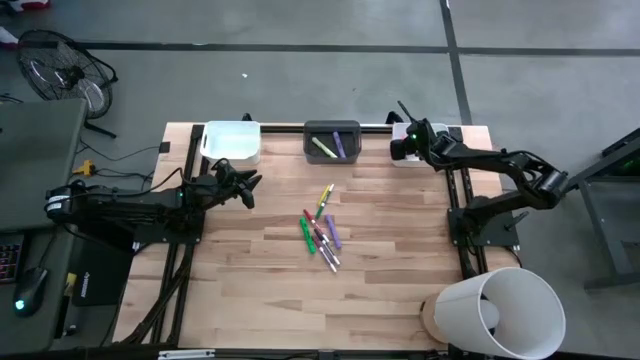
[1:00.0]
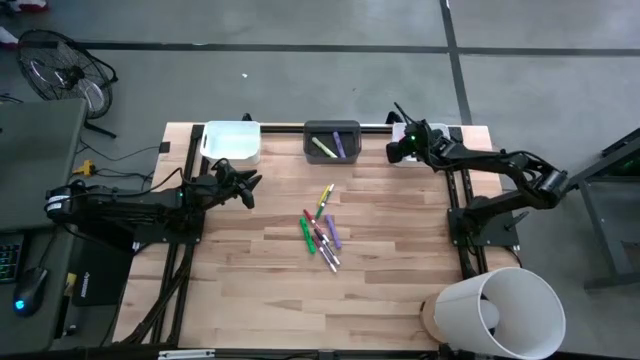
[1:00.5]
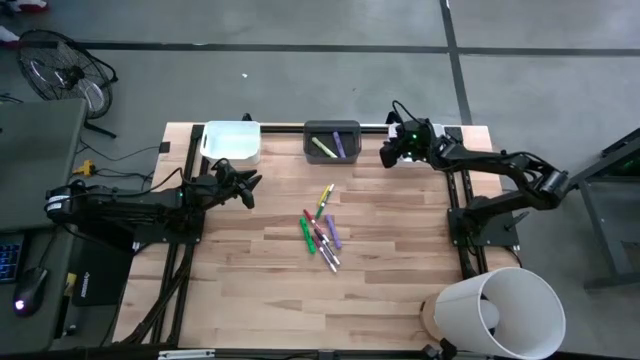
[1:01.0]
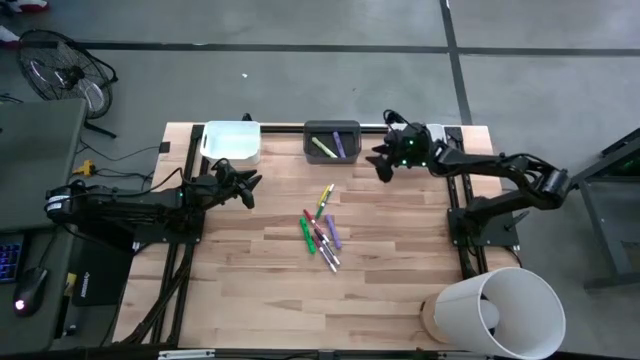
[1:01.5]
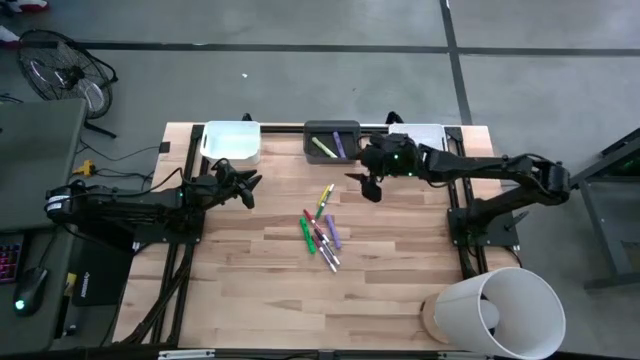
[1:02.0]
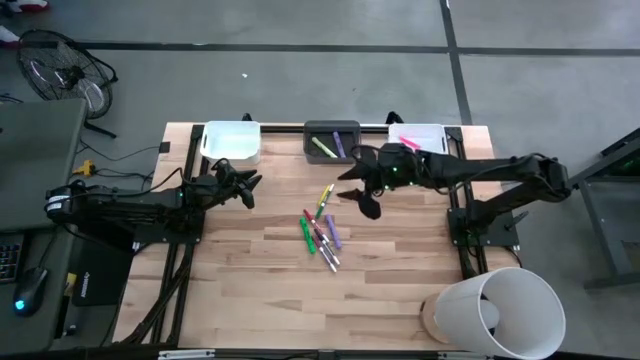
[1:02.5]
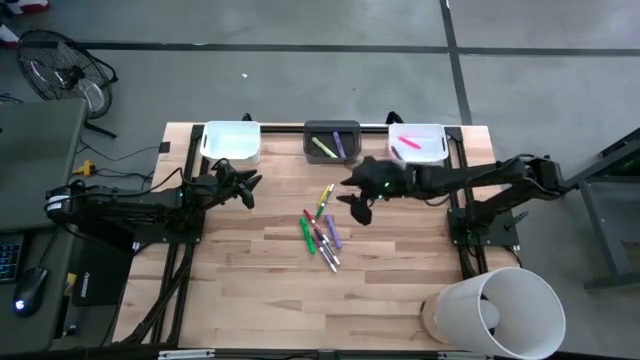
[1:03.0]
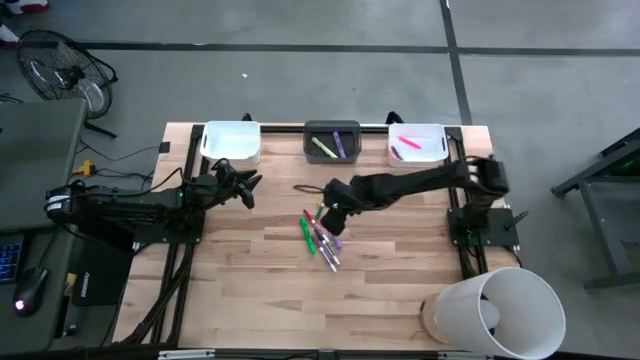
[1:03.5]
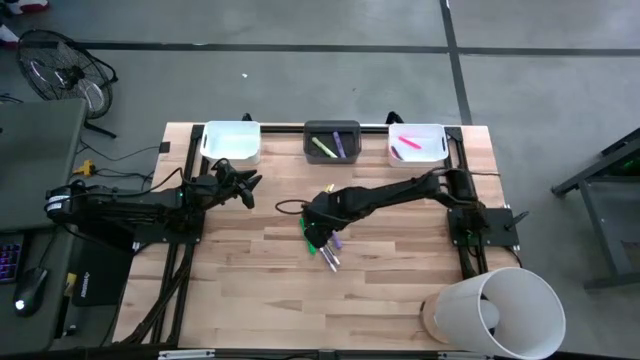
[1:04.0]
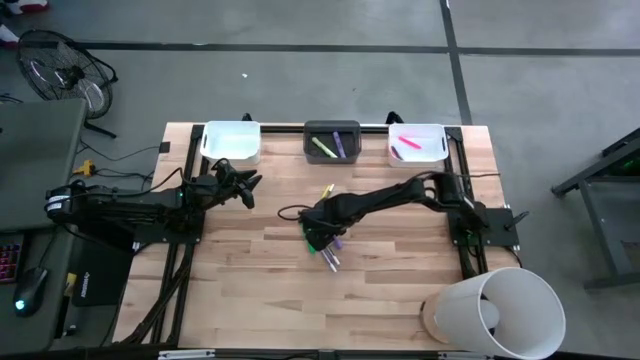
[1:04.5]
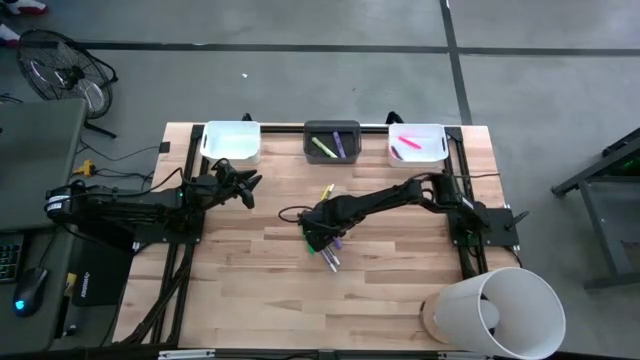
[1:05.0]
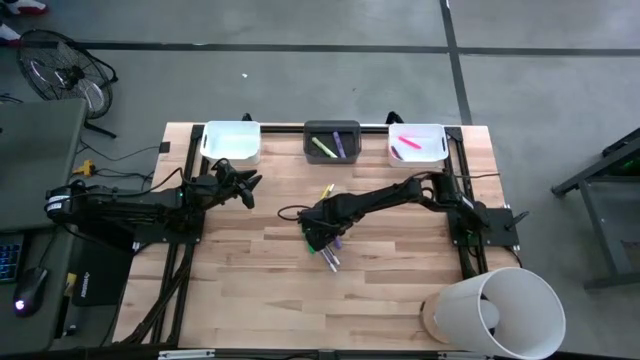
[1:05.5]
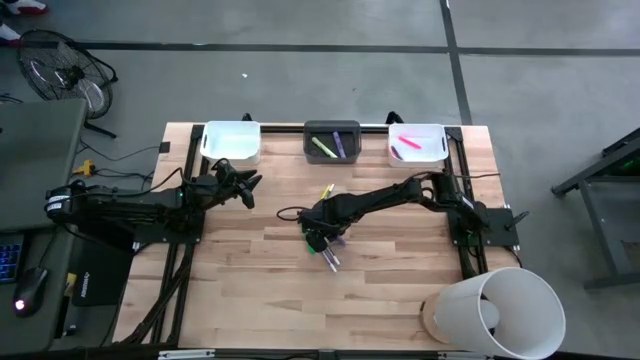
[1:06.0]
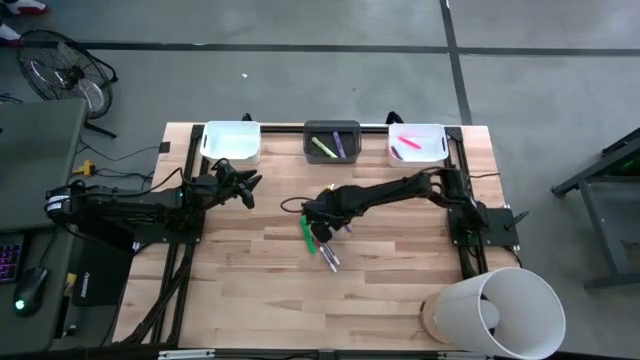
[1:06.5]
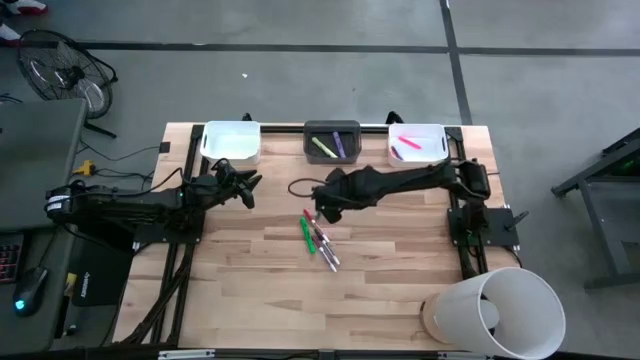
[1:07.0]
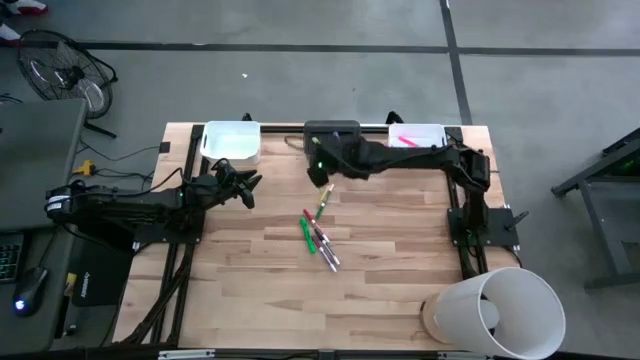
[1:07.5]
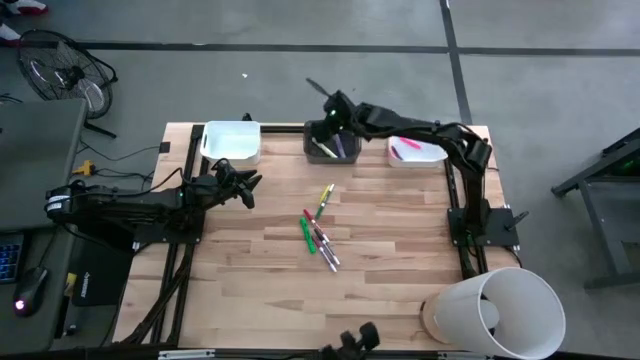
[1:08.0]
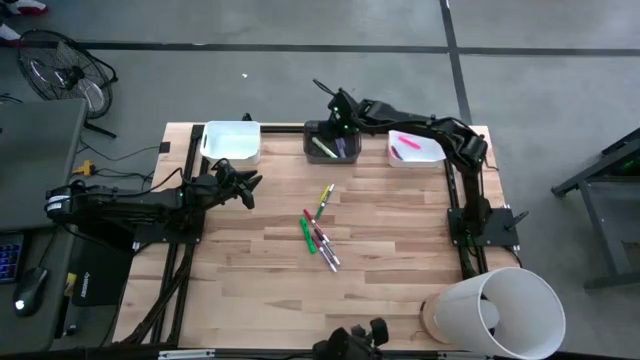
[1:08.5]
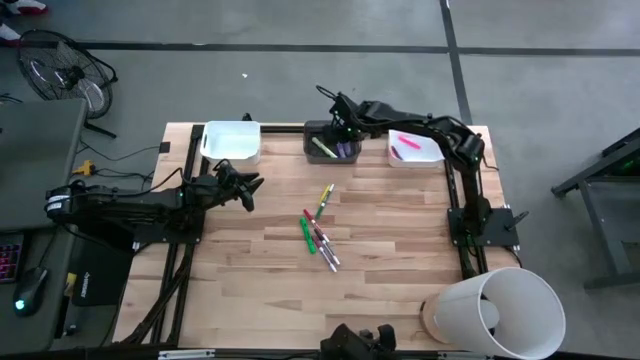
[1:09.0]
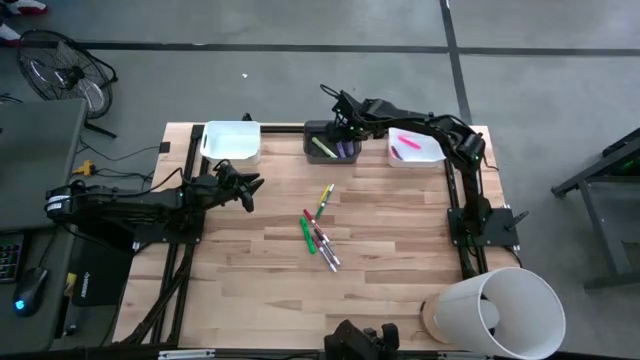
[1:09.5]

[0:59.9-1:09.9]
Task: Pick & Place Markers
Put the violet marker pen into the black bin

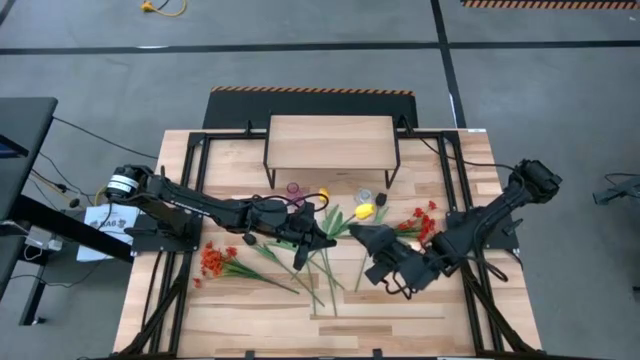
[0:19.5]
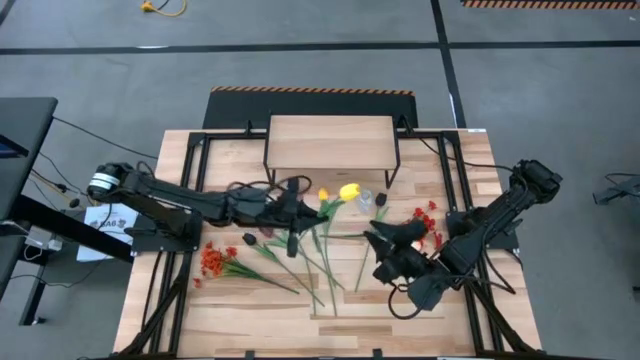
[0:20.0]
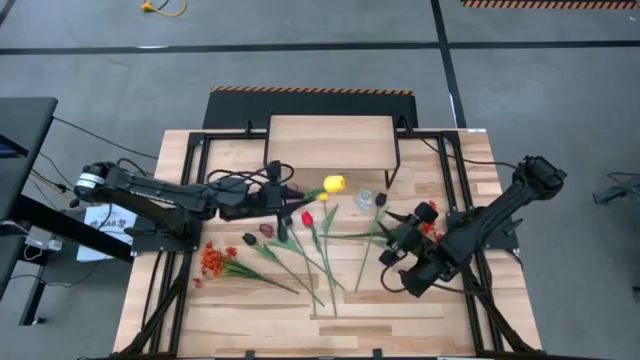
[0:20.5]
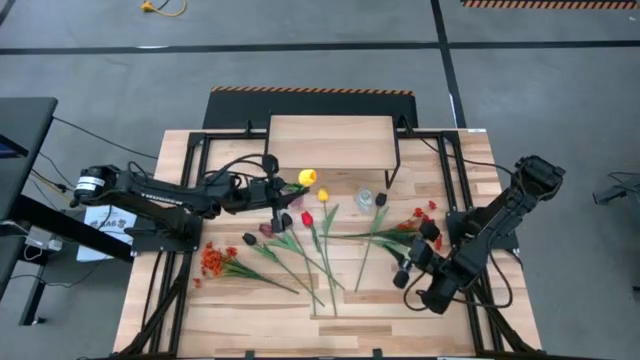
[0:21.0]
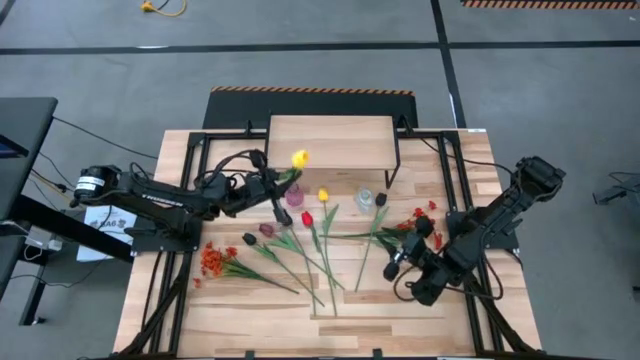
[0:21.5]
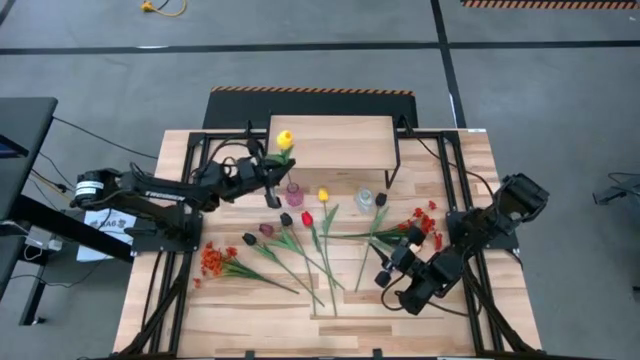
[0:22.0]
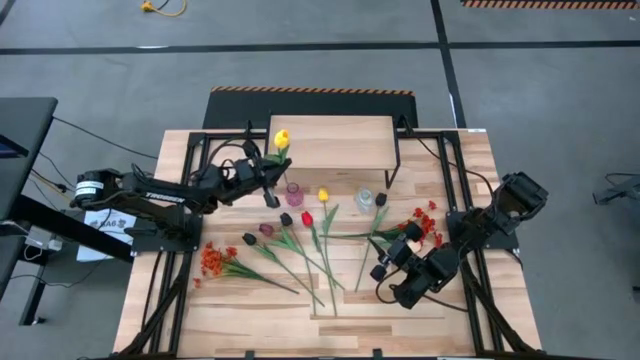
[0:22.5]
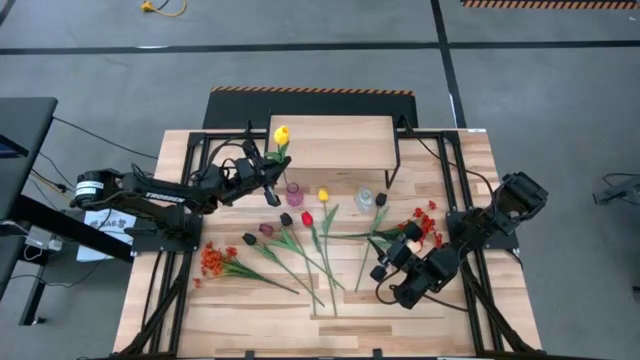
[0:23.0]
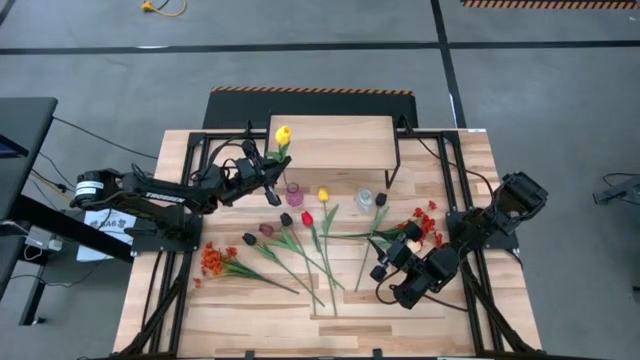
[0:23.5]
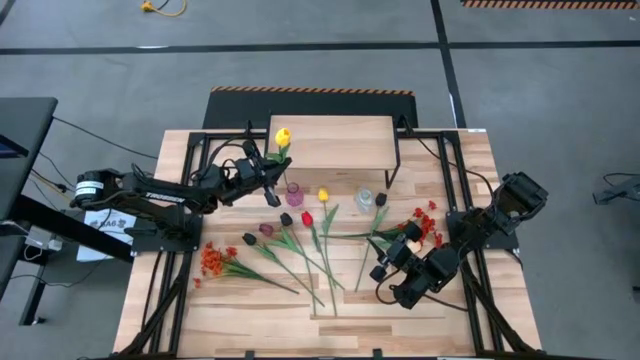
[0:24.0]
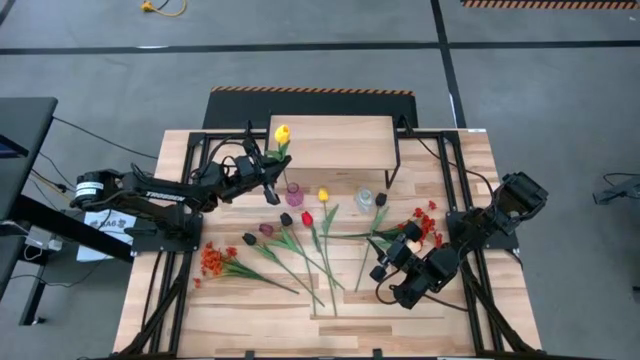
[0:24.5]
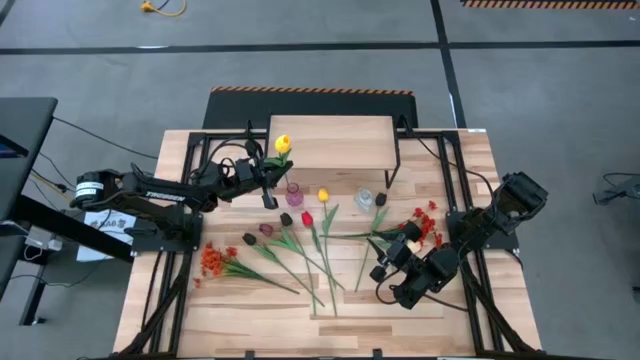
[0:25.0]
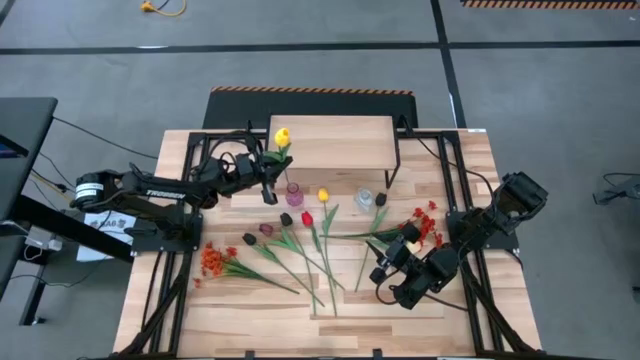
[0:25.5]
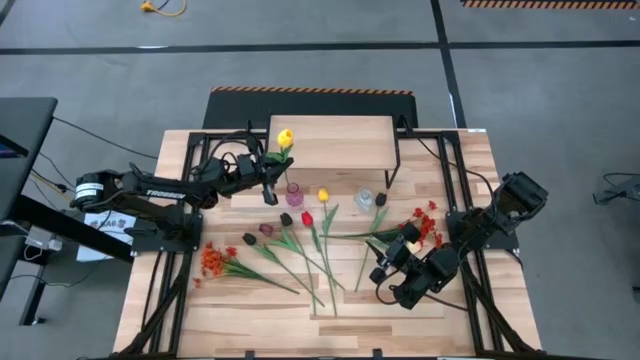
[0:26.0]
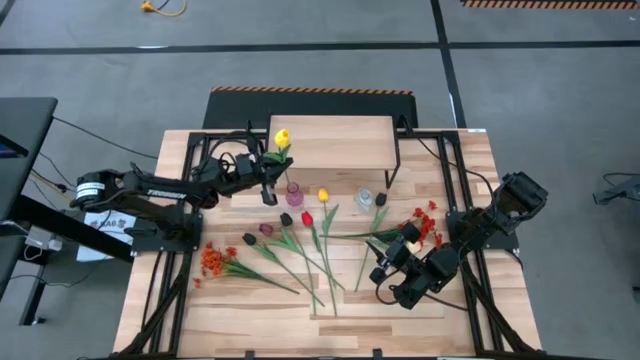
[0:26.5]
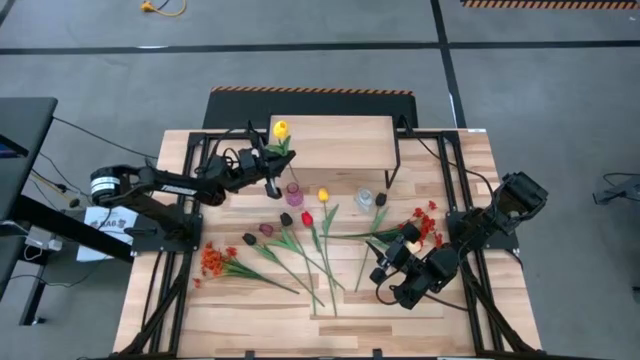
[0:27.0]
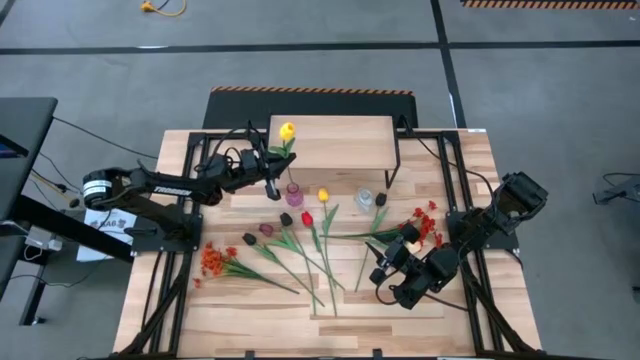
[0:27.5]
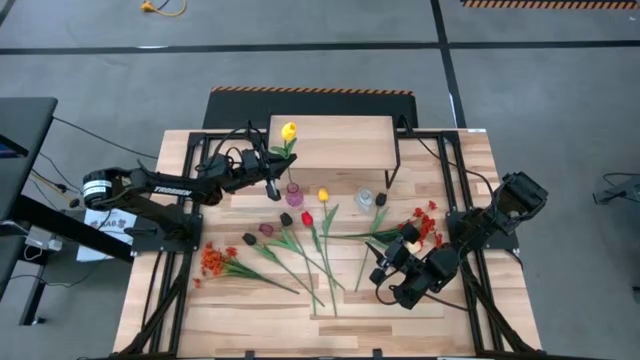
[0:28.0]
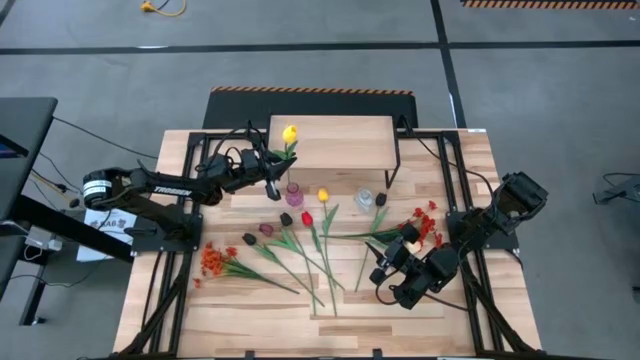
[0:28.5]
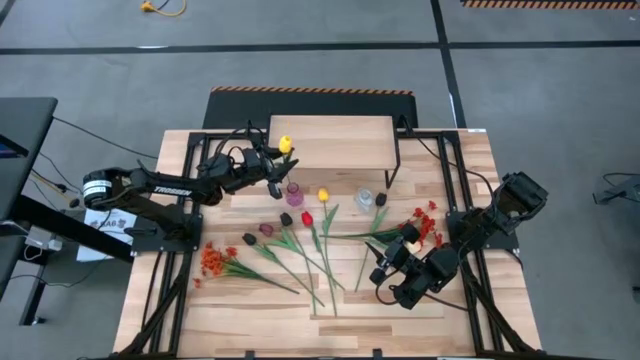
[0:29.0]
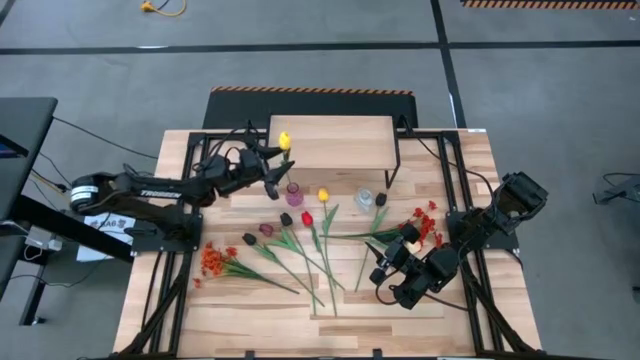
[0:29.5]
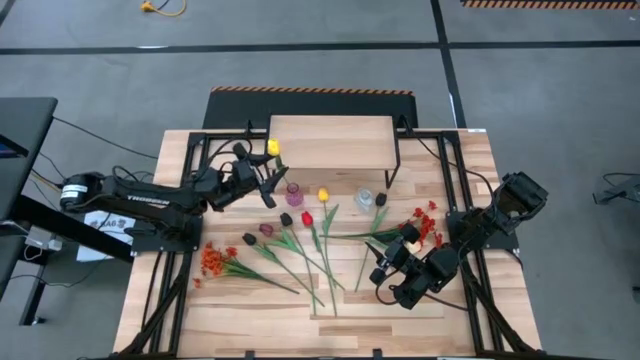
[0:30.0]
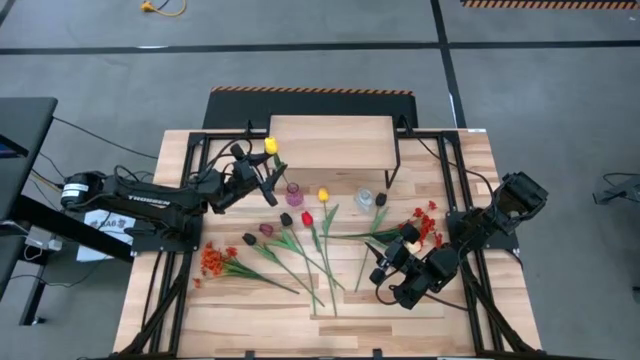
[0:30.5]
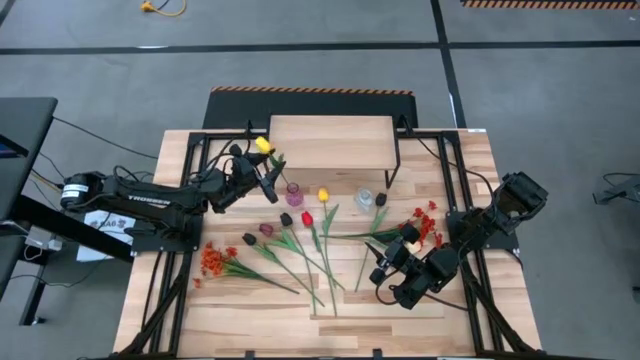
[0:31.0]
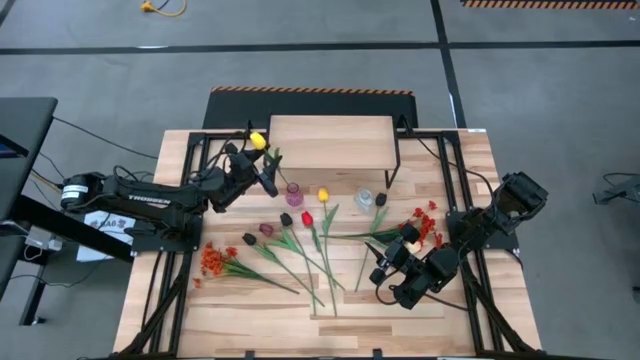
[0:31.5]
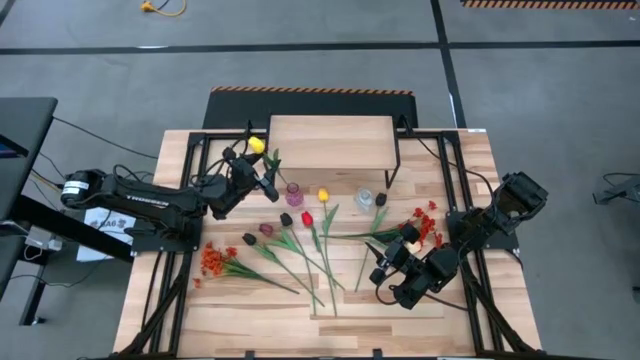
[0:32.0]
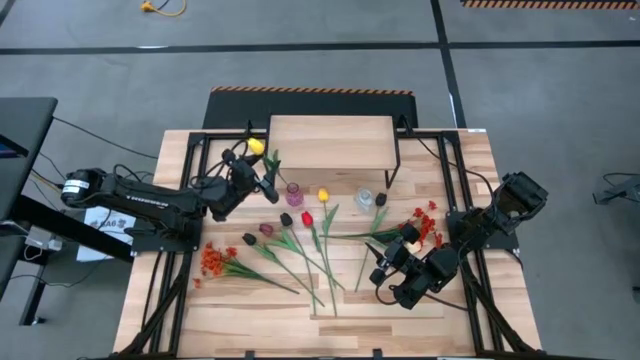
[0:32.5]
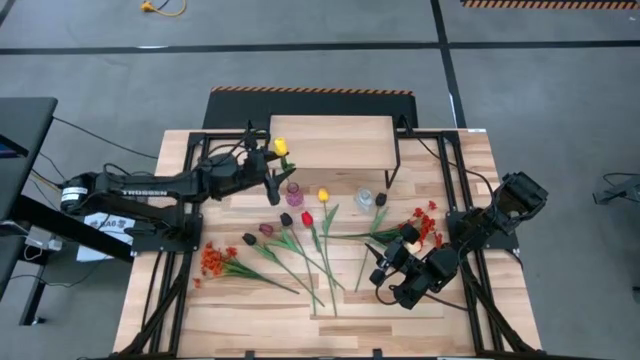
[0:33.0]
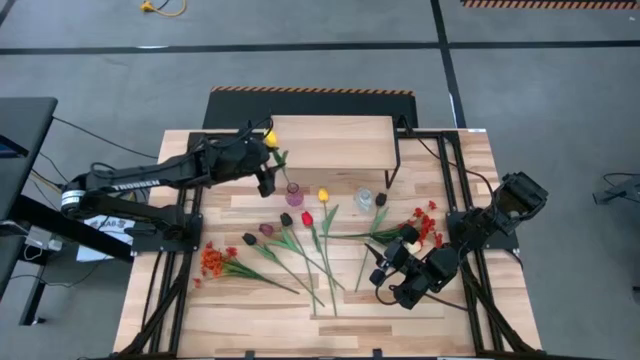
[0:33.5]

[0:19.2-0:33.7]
Task: Pick and place flowers into a vace then onto a shelf
Put the bottom yellow tulip into the violet vase
